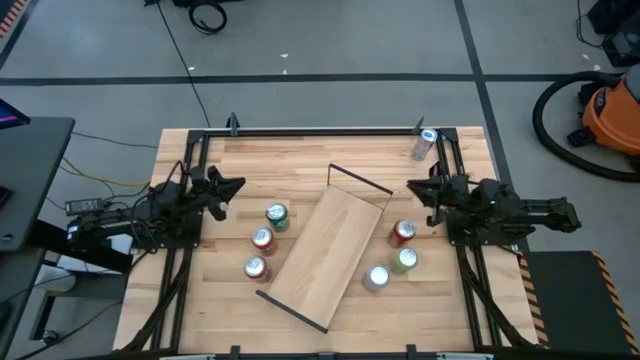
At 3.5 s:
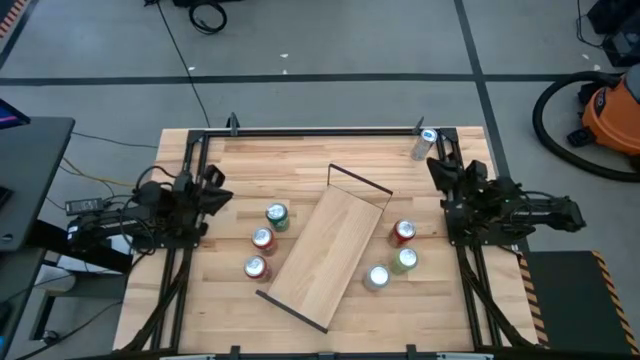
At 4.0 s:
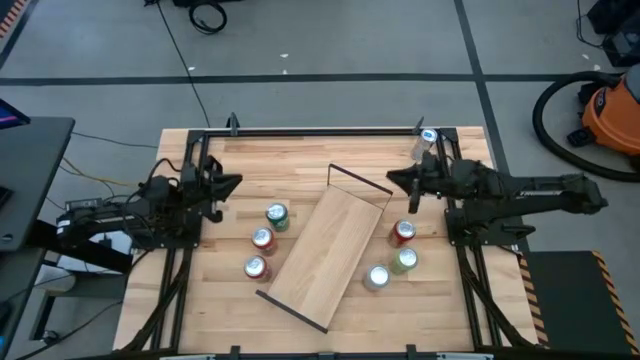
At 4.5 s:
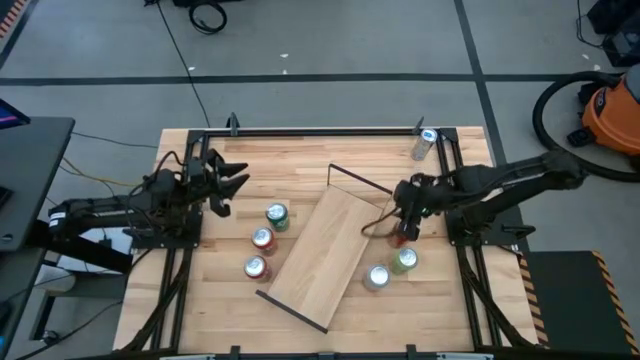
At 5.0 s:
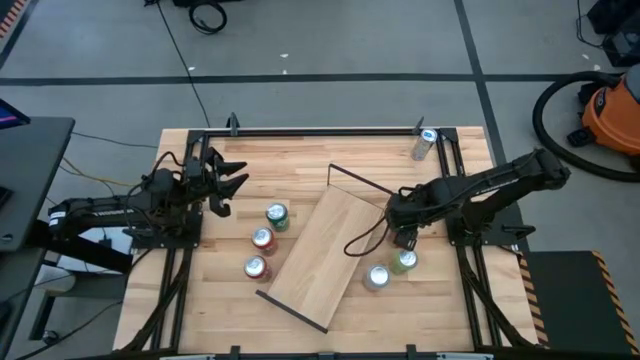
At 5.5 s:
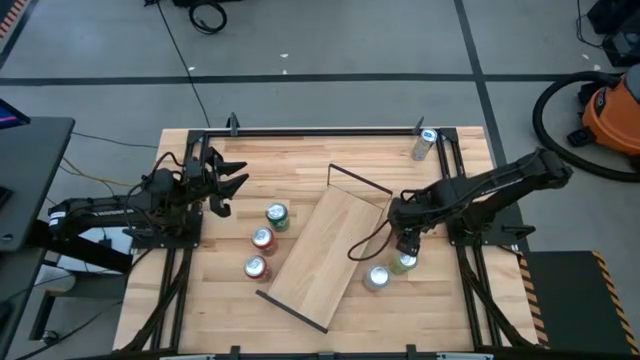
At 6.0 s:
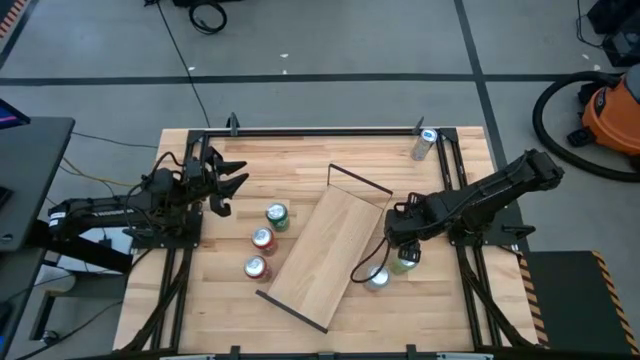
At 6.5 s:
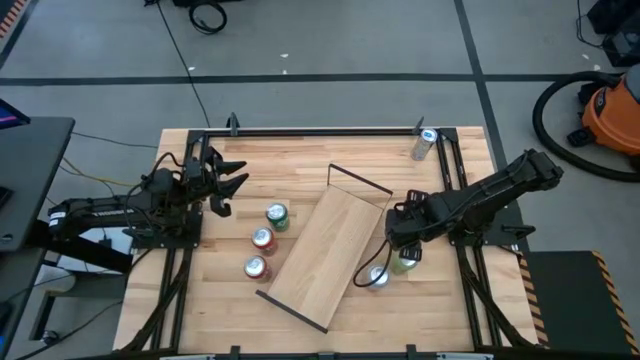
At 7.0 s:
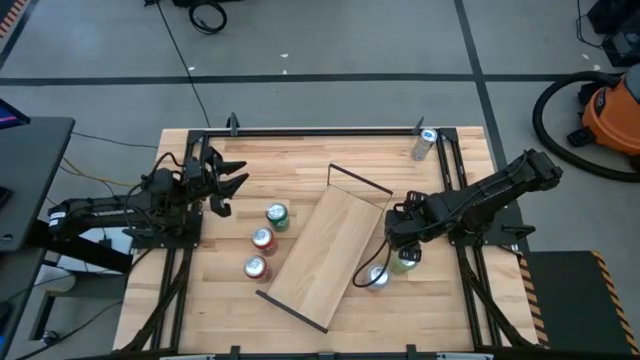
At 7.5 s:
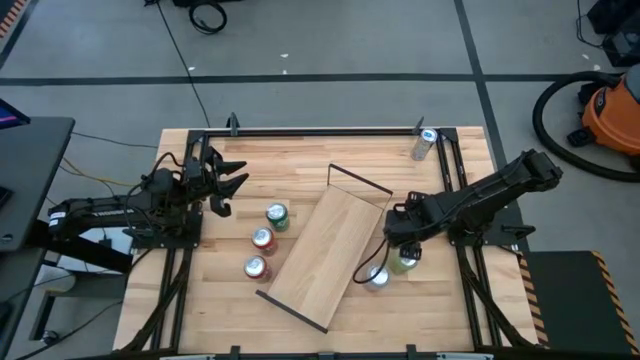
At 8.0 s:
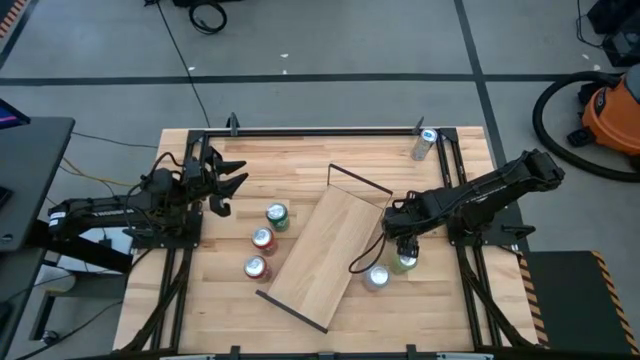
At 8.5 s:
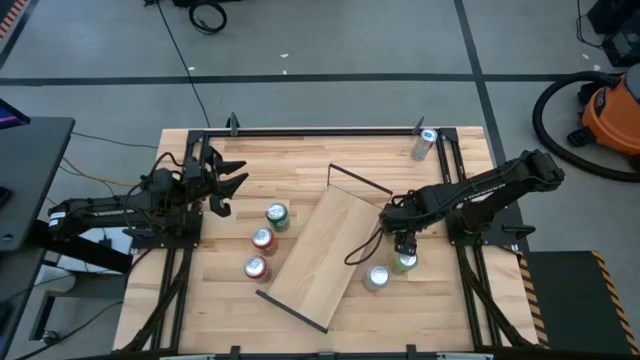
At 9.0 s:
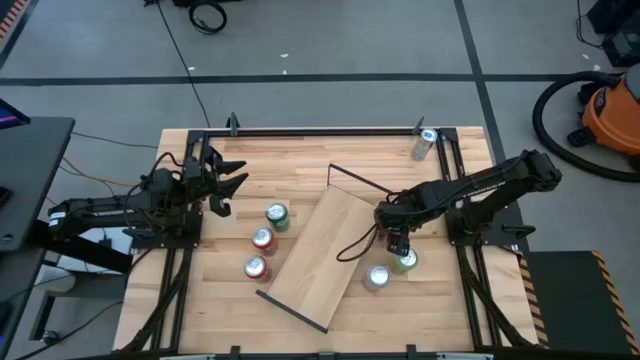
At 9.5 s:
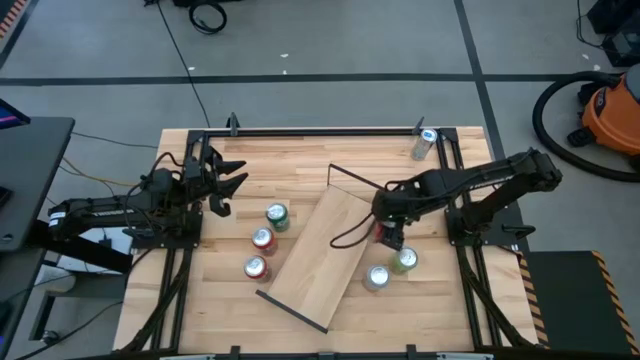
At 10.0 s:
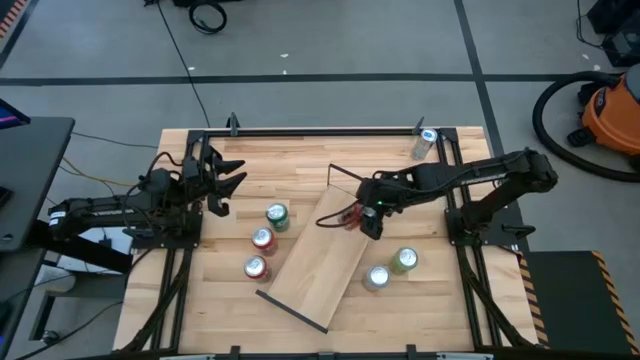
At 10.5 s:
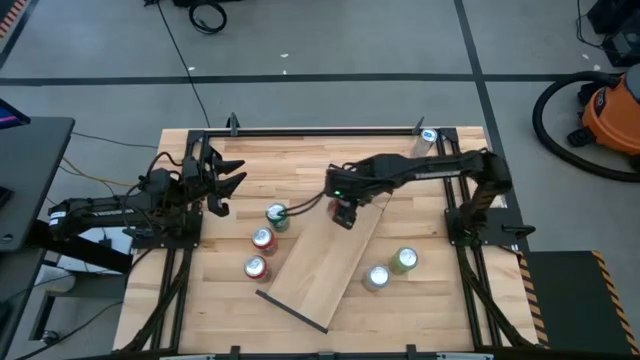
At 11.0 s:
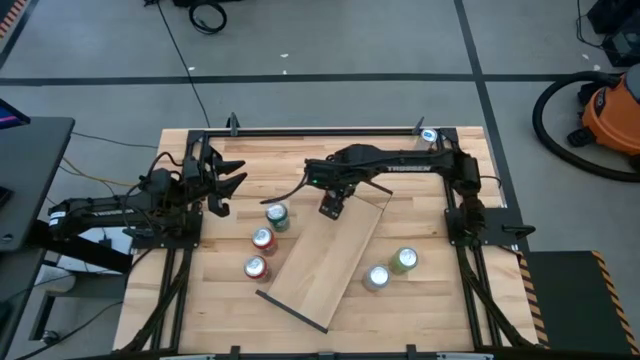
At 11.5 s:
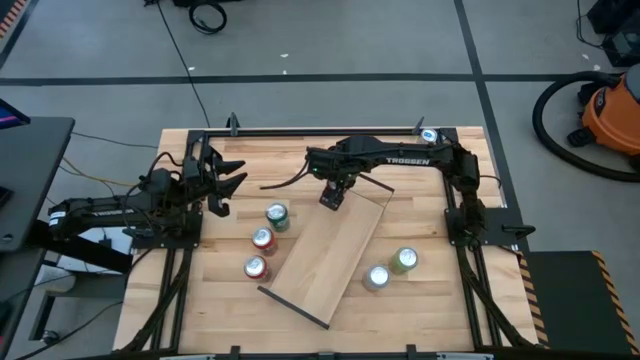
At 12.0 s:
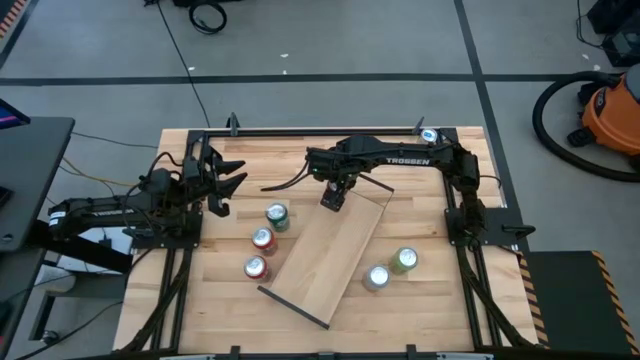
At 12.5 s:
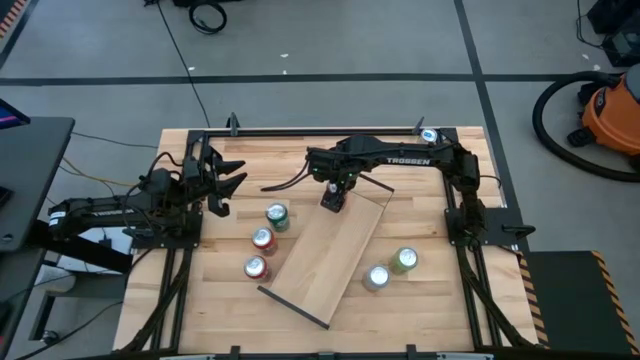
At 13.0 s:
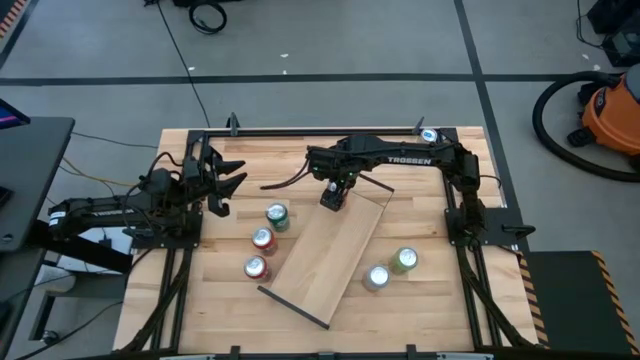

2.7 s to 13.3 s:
Task: Place canned beverage on shelf
Put the red-black soda can on the shelf

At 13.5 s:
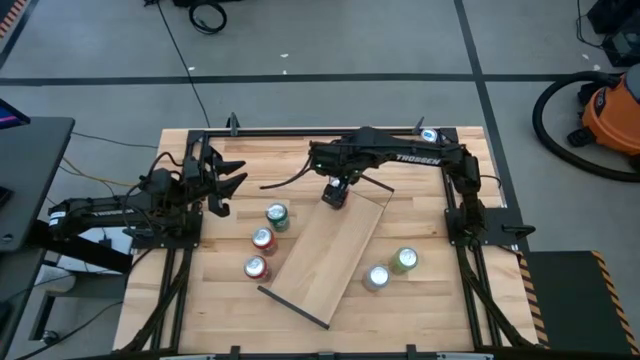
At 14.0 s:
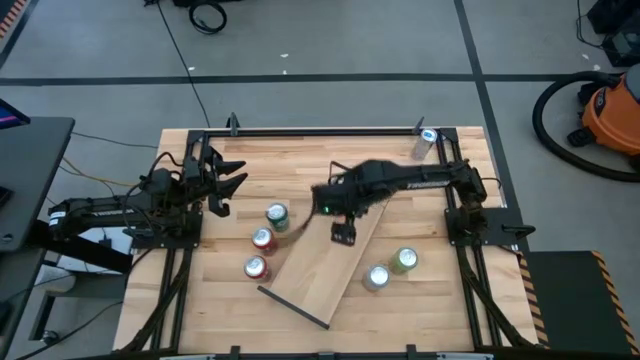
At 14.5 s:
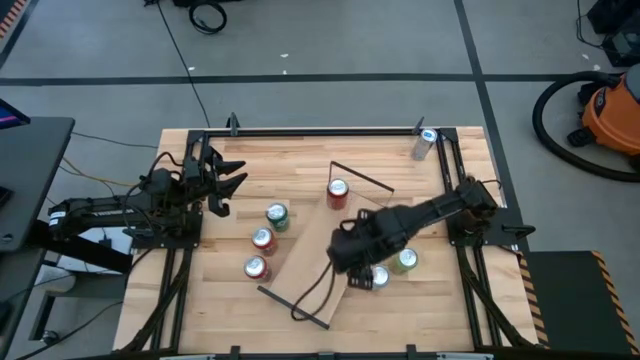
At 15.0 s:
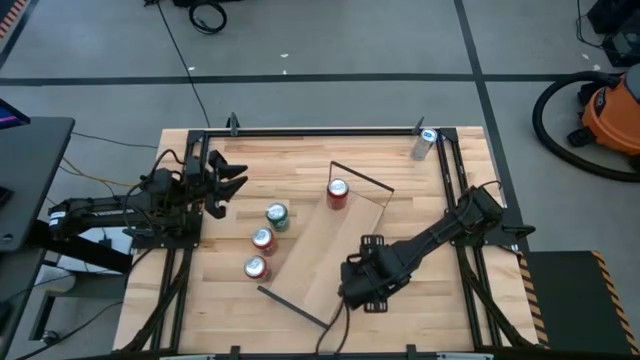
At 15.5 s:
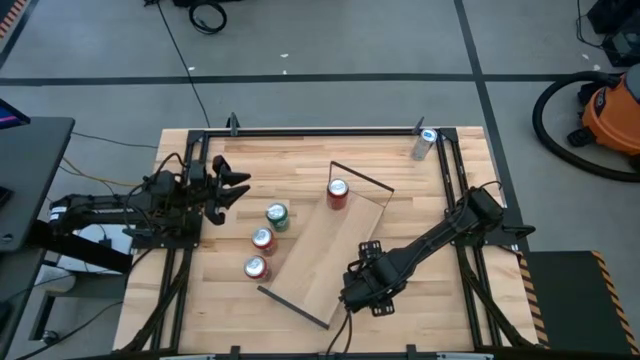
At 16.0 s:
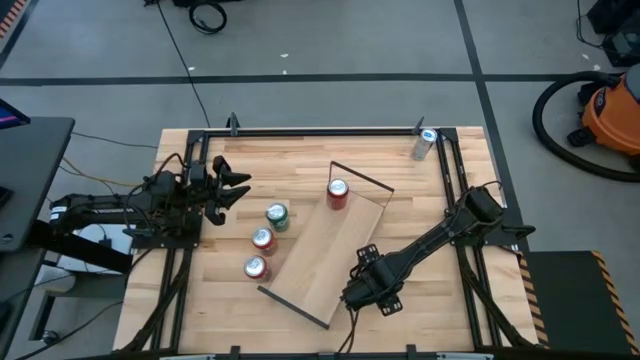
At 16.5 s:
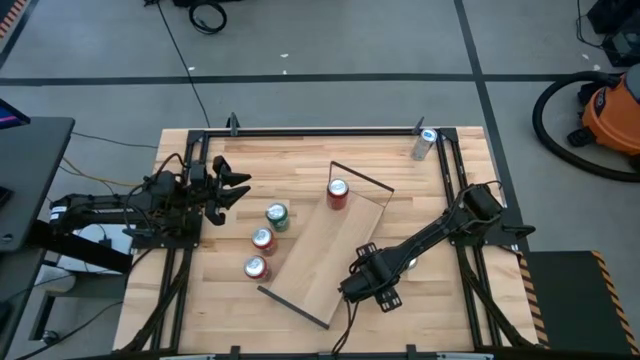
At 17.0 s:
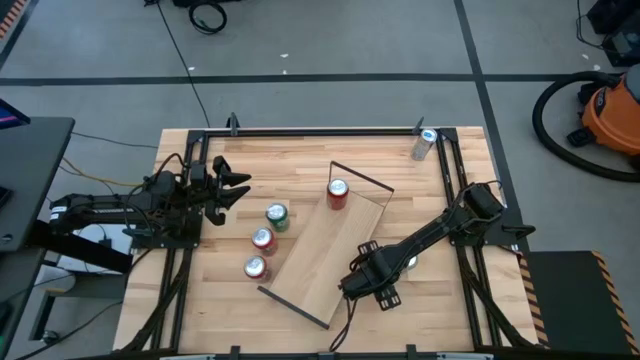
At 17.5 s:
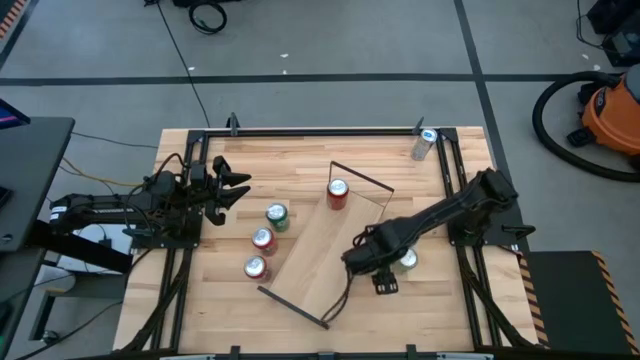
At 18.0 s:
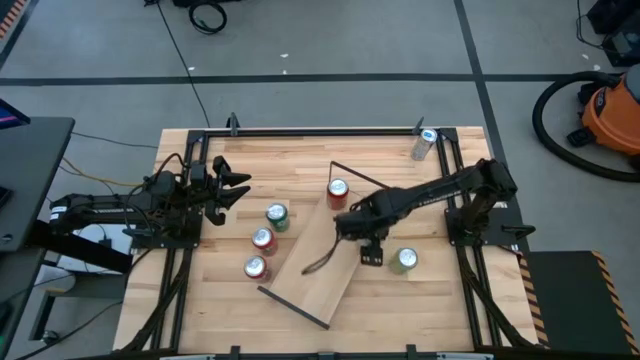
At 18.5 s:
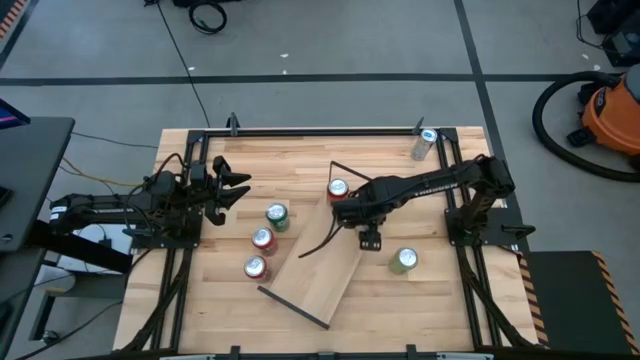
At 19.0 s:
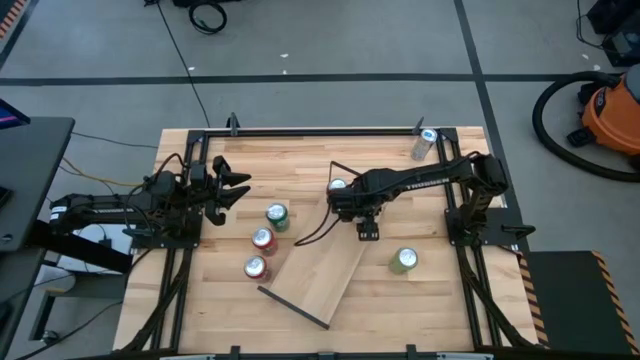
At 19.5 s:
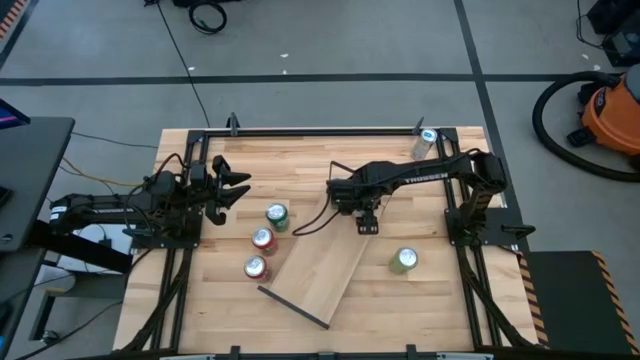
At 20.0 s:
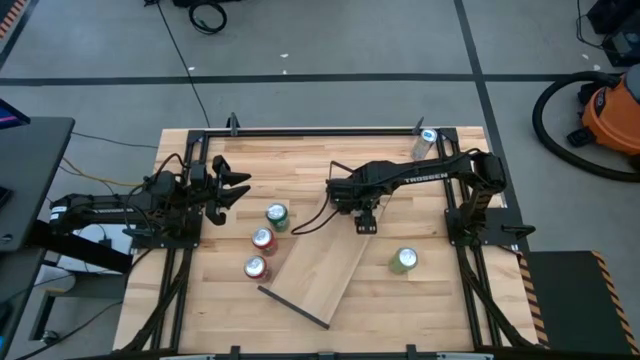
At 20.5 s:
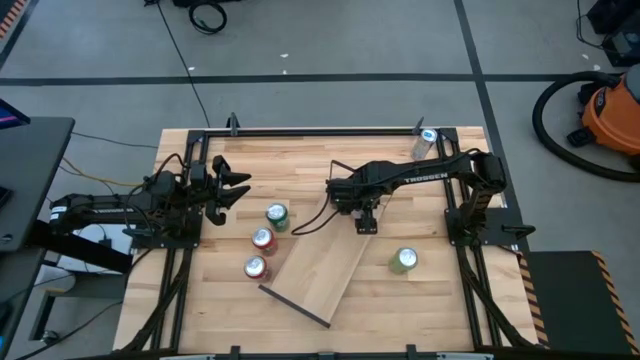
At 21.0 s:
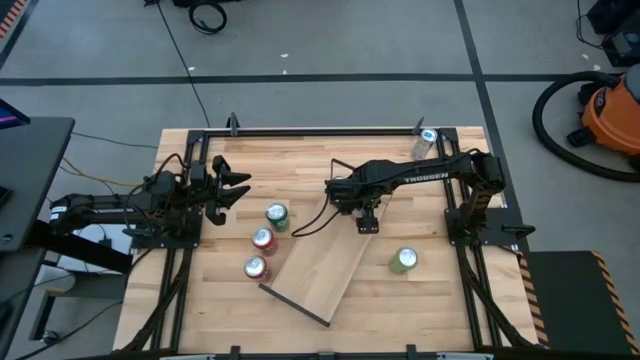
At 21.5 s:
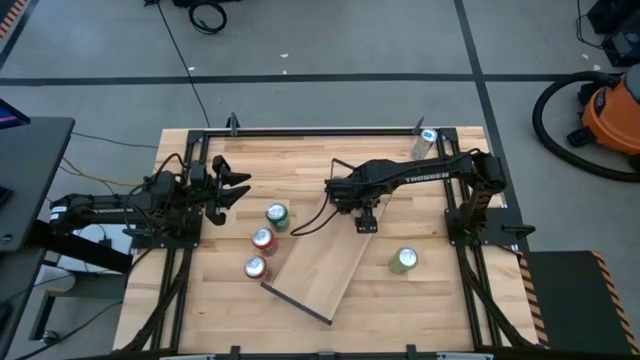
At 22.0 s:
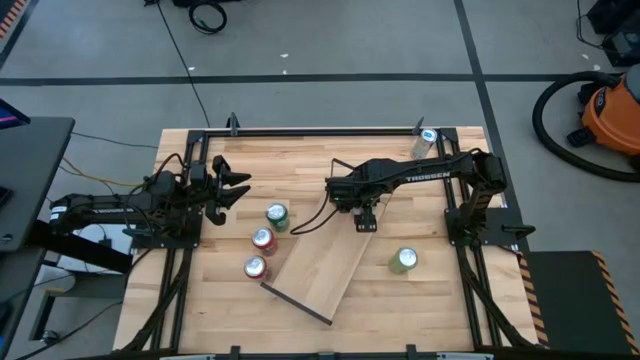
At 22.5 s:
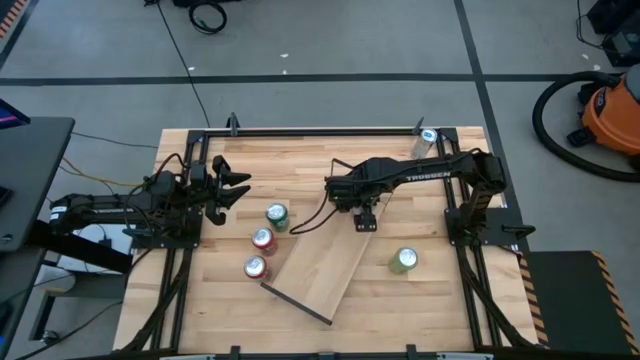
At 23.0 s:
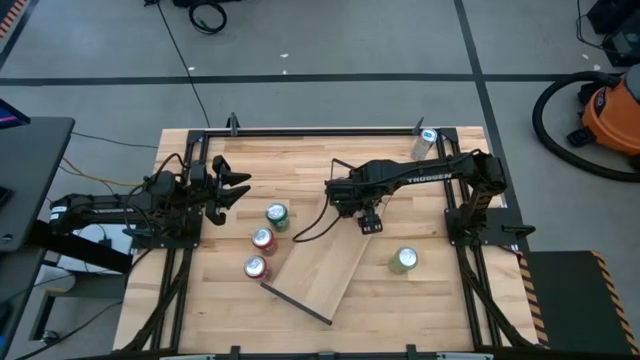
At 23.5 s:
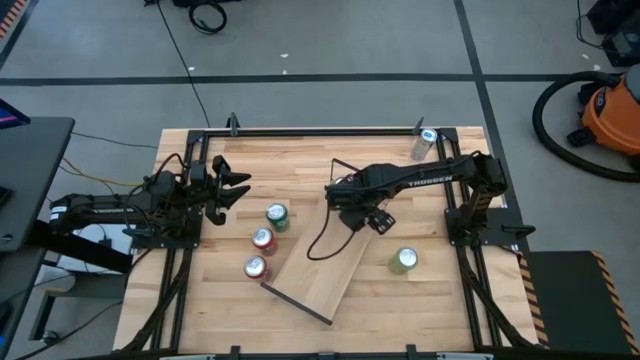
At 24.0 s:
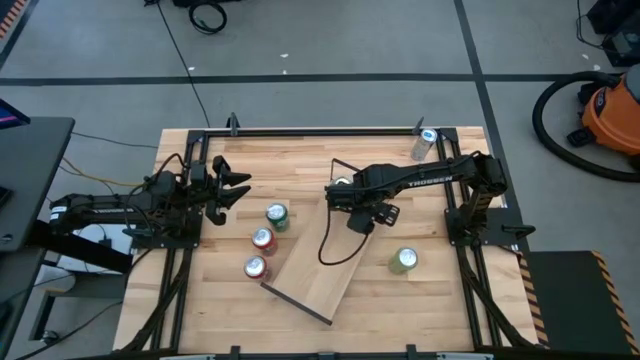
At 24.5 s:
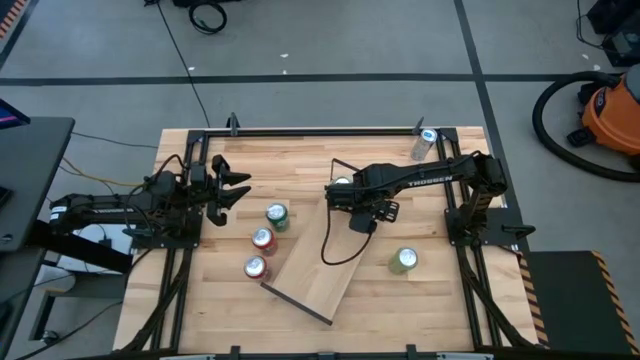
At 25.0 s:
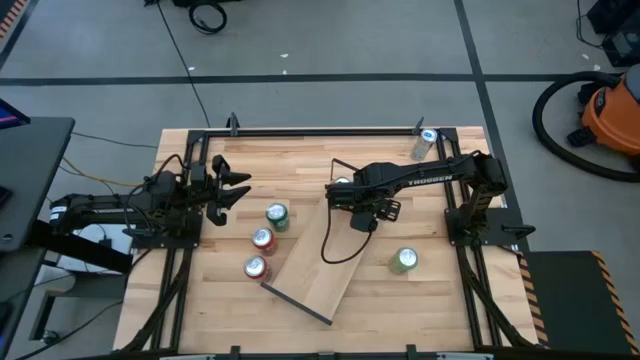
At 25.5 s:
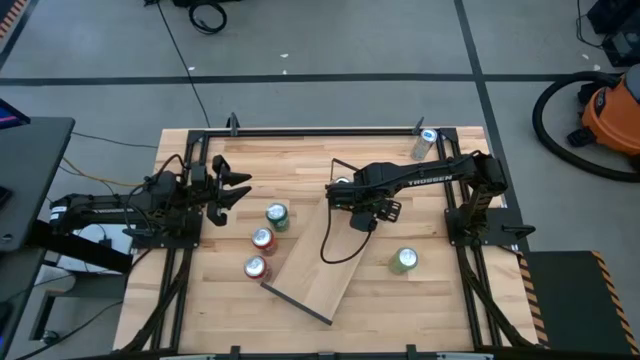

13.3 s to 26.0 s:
Put the white-orange soda can on the shelf
